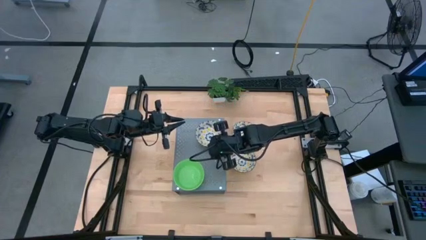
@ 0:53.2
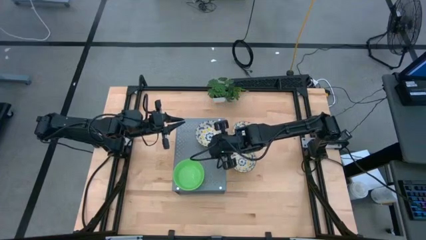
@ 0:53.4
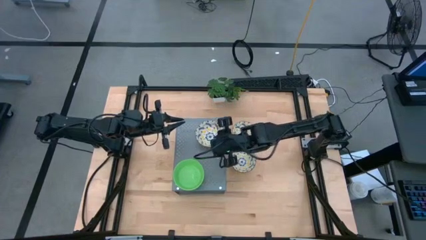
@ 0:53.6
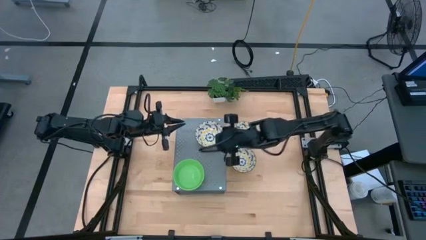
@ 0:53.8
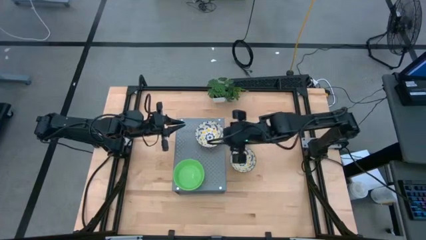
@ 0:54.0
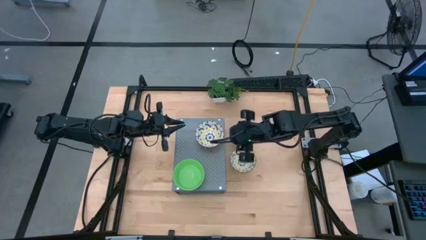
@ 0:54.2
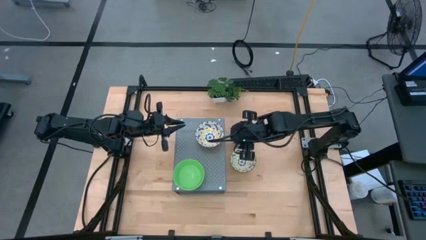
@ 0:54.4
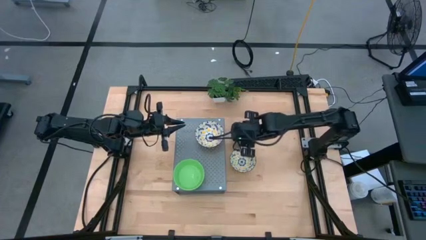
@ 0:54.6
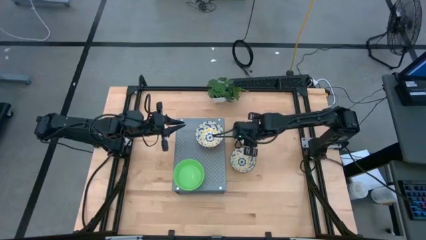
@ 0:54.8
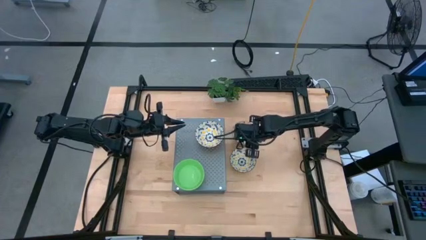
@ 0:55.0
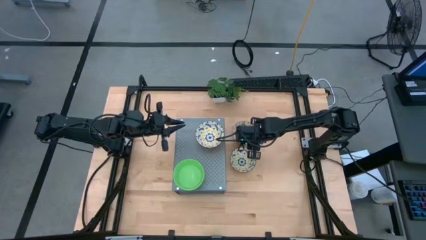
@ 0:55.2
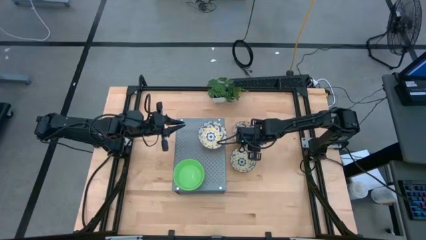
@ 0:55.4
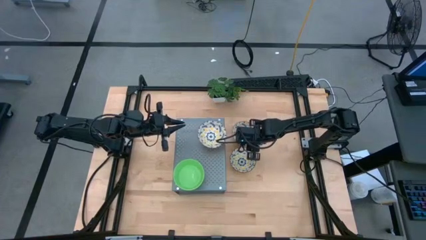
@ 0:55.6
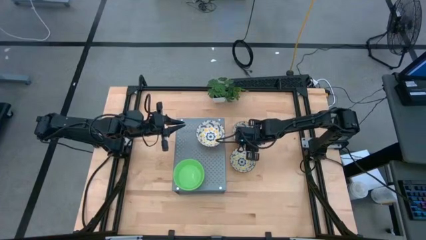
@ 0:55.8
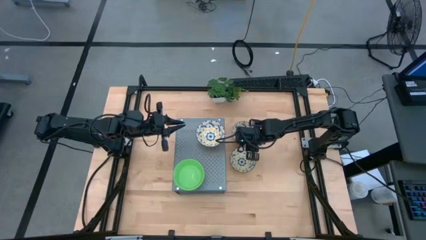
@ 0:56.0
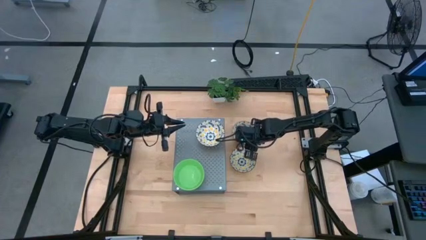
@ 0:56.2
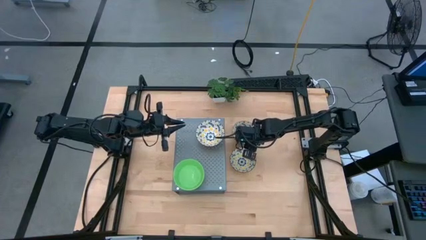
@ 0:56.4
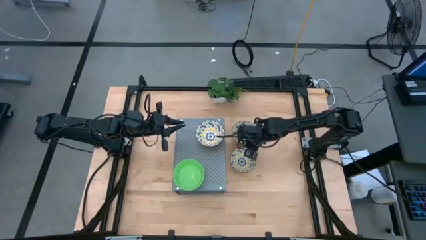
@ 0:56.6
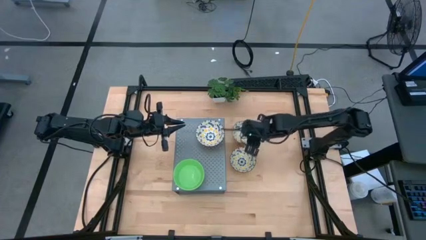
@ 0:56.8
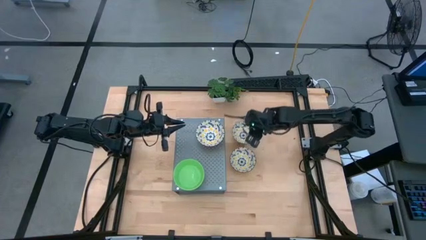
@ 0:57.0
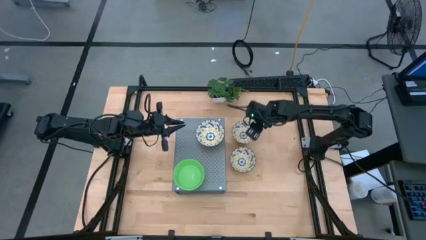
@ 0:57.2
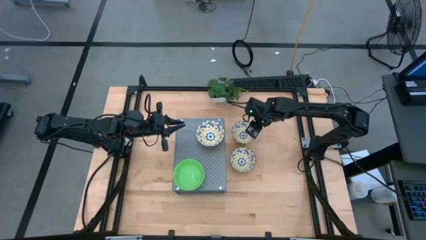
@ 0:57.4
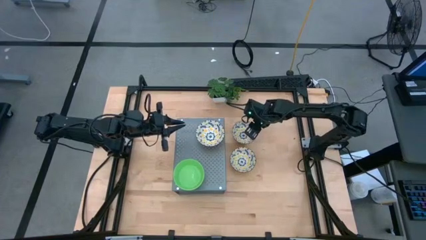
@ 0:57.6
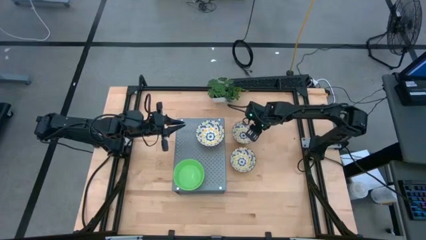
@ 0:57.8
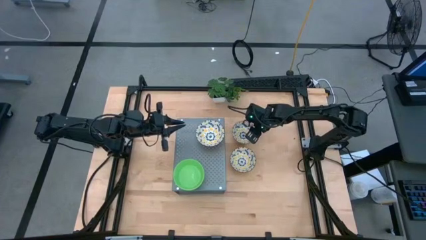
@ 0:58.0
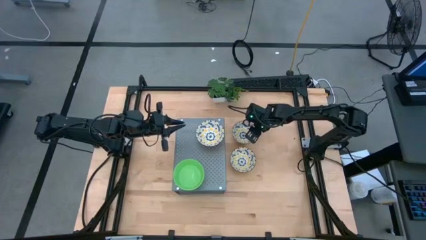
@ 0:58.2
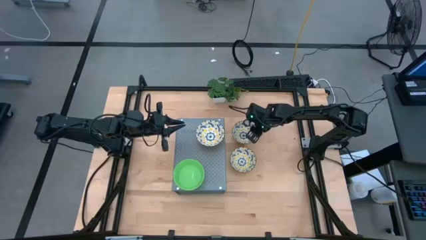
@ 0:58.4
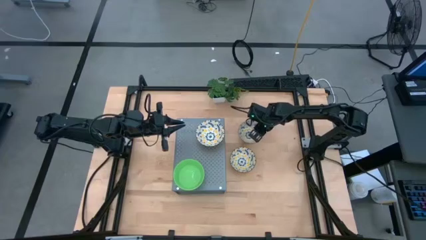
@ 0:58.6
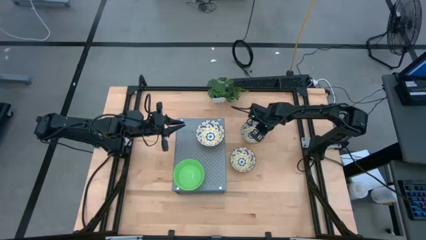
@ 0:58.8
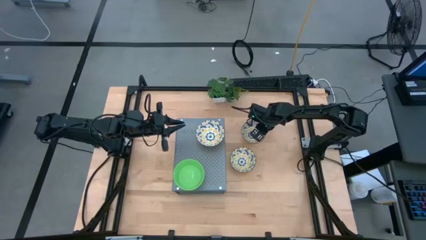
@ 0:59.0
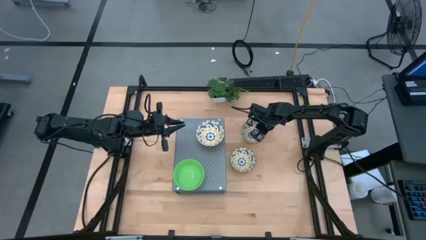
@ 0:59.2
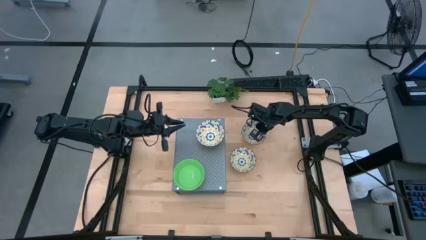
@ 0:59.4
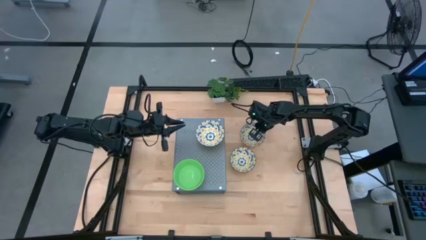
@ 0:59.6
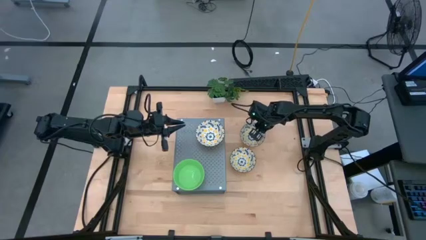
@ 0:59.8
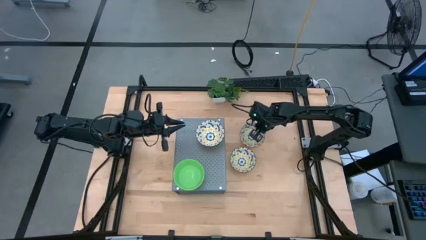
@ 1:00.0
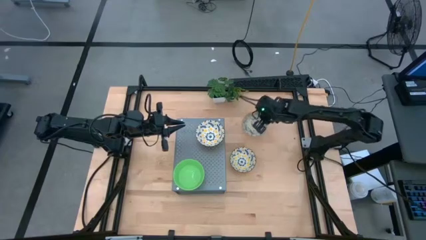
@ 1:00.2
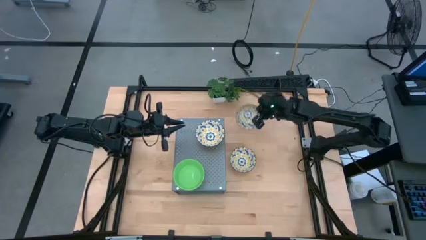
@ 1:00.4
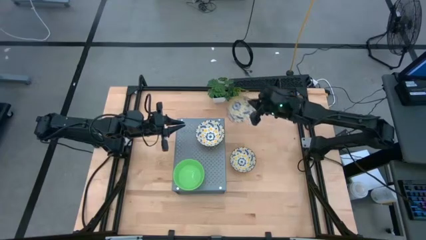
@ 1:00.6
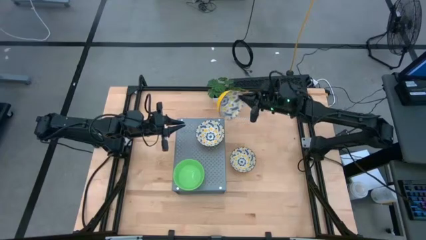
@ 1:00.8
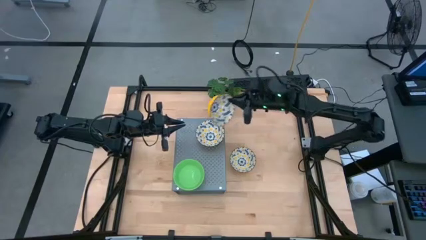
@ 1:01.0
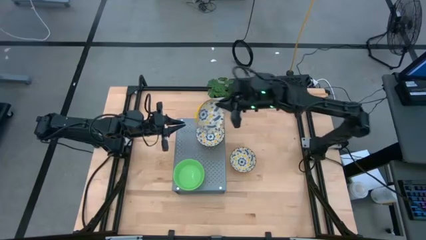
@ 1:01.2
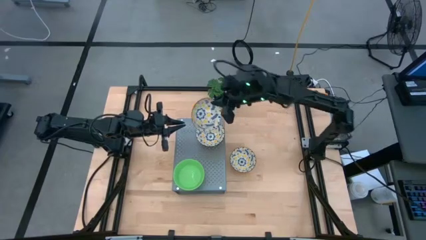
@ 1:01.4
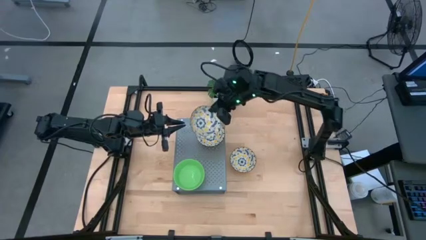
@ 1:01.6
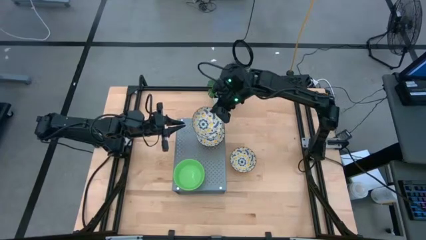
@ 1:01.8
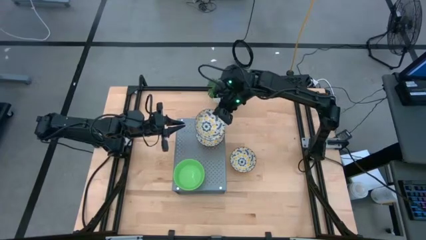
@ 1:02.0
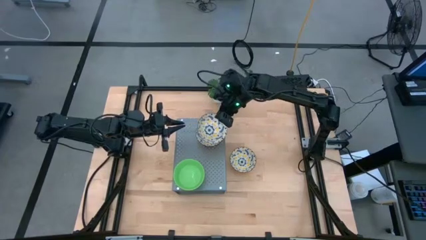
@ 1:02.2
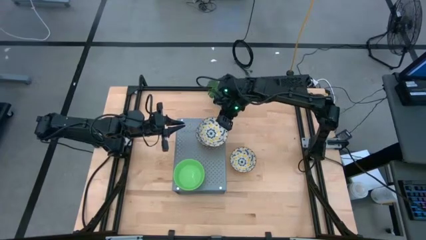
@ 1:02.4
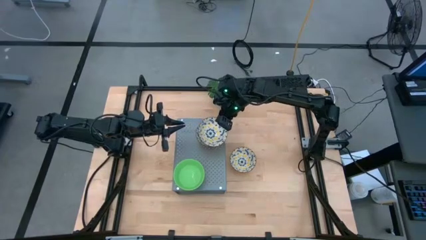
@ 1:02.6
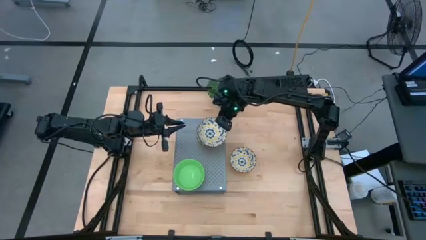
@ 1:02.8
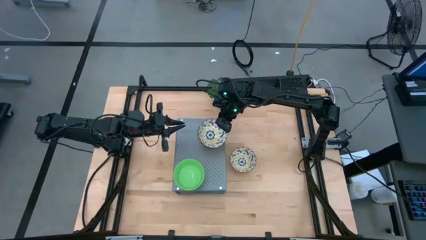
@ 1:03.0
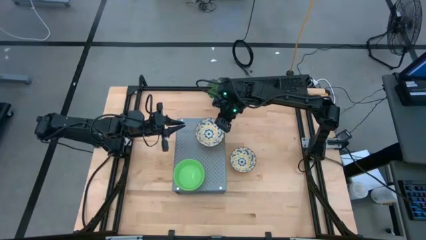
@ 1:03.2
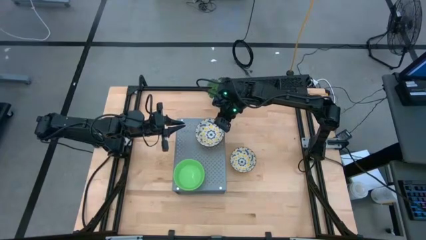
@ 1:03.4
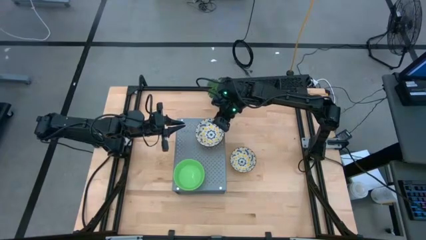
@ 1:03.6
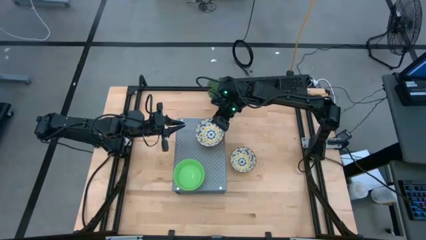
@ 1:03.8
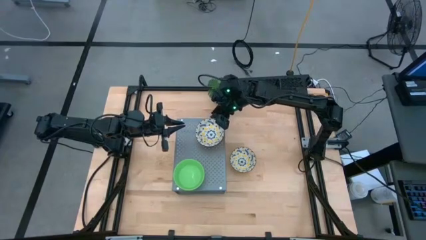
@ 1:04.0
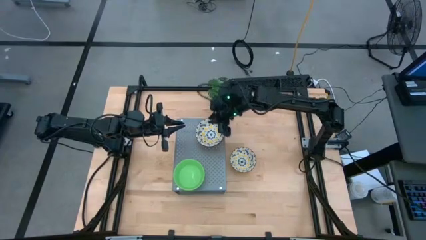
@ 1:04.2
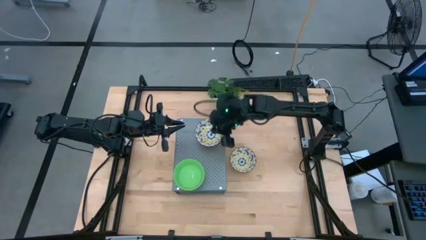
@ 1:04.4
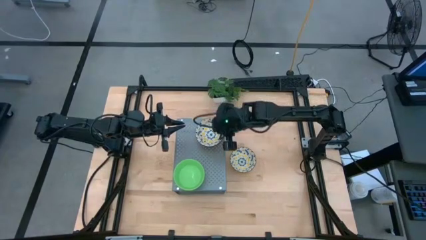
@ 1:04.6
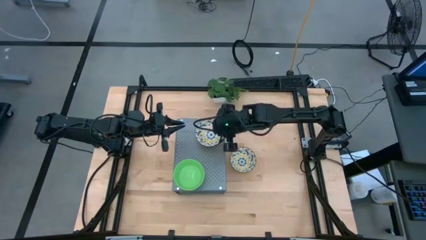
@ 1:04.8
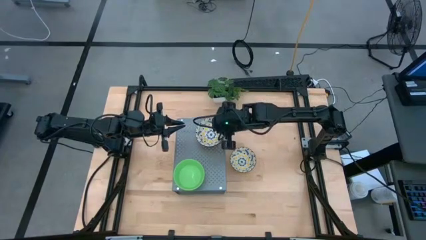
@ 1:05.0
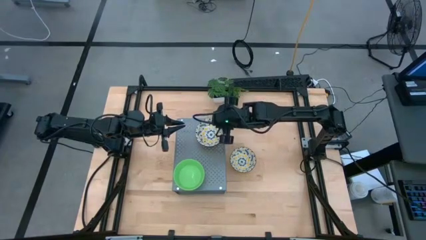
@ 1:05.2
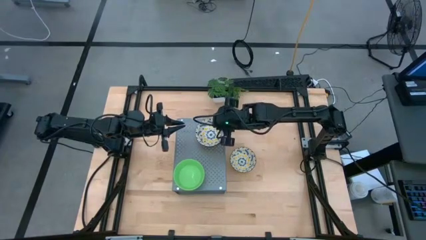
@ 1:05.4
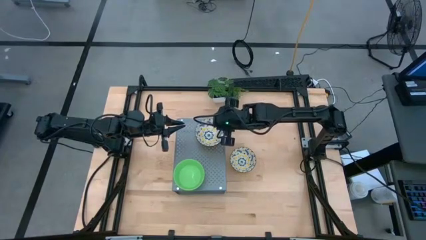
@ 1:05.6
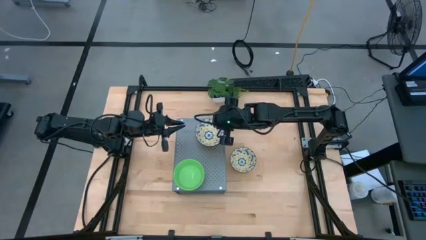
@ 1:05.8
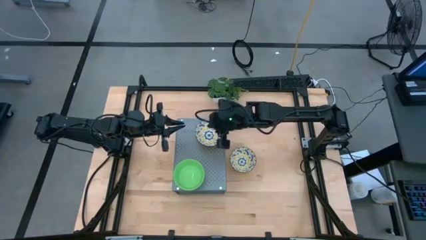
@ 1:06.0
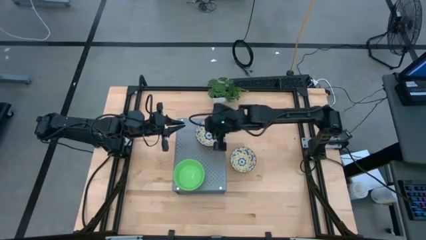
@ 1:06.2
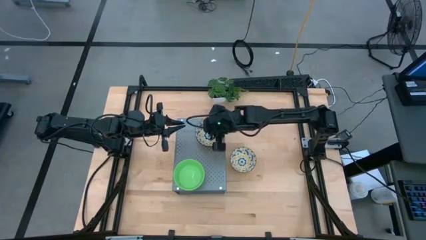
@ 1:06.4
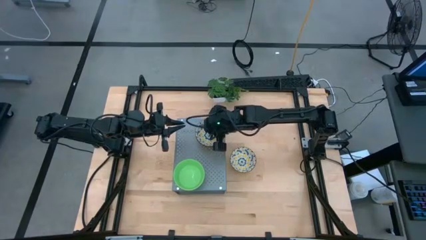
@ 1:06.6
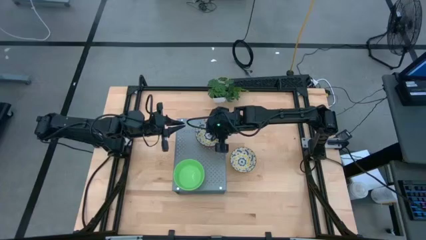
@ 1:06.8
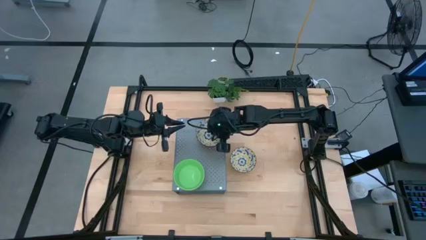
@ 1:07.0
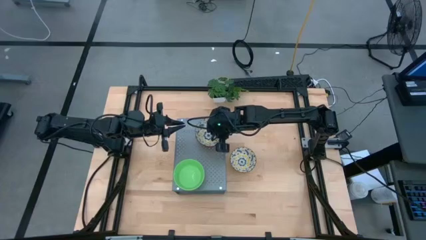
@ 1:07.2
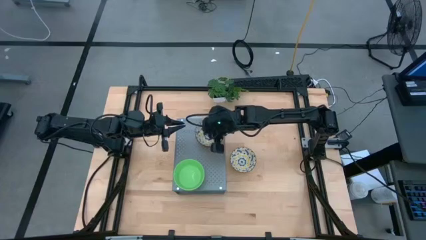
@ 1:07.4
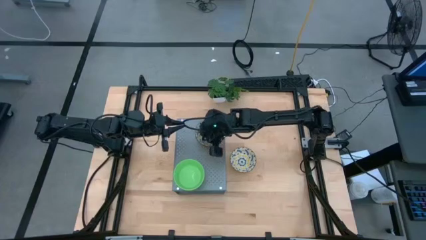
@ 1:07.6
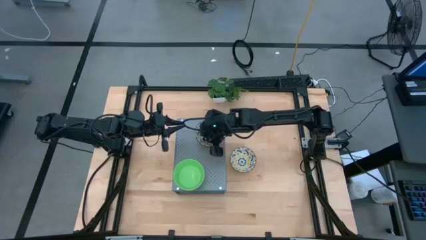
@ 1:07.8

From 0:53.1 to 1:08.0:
Task: Pick & Place Mini bowls
Stack the top white patterned bowl on the white patterned bowl on the shelf

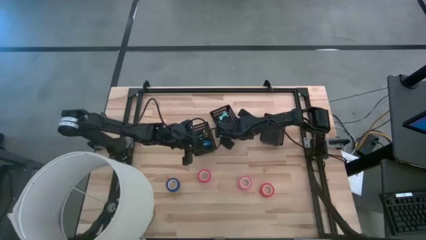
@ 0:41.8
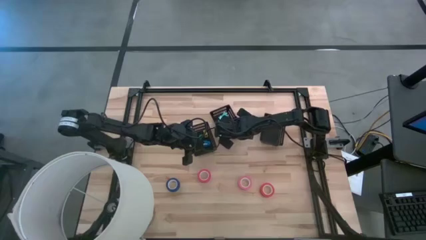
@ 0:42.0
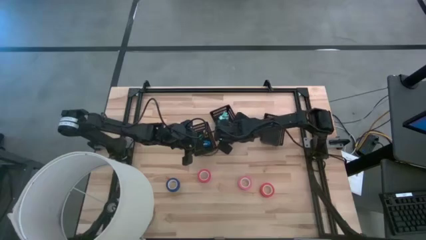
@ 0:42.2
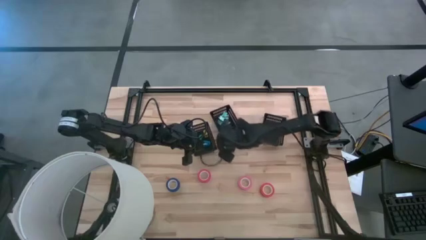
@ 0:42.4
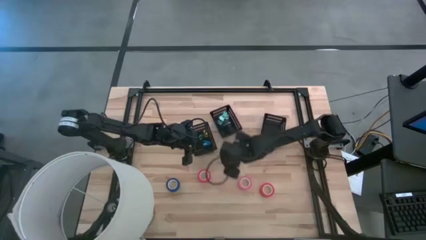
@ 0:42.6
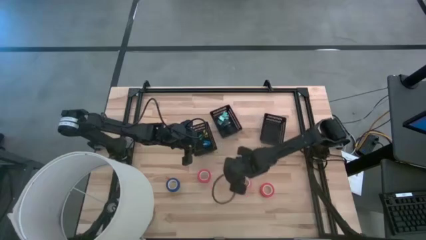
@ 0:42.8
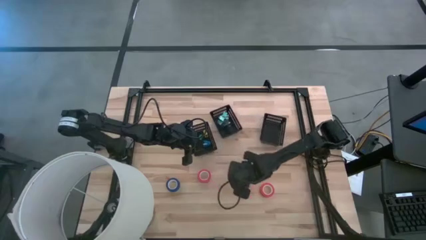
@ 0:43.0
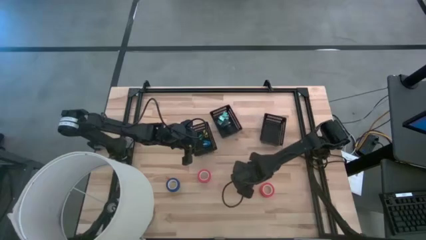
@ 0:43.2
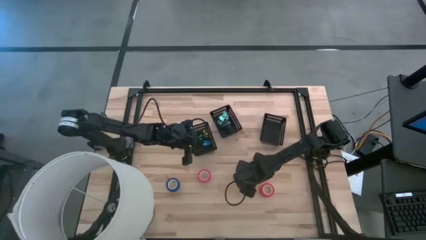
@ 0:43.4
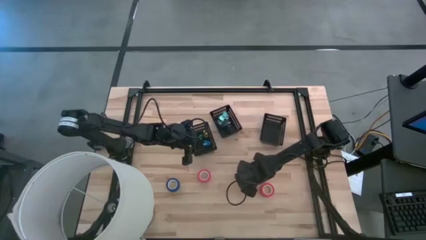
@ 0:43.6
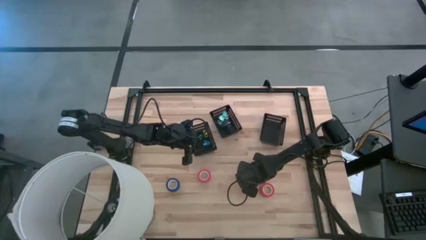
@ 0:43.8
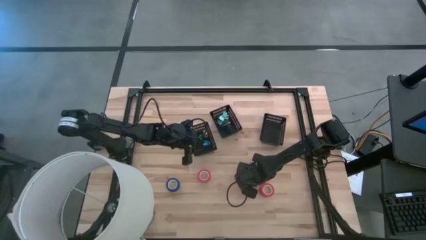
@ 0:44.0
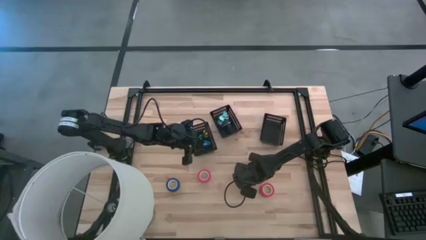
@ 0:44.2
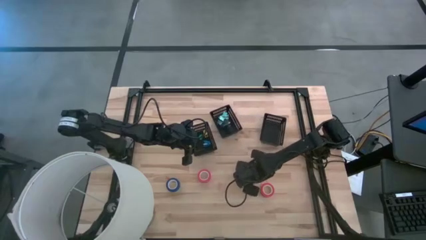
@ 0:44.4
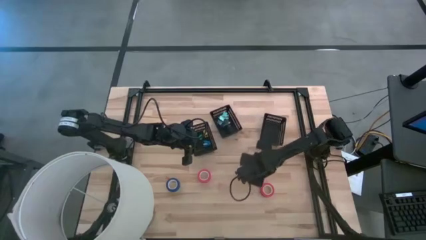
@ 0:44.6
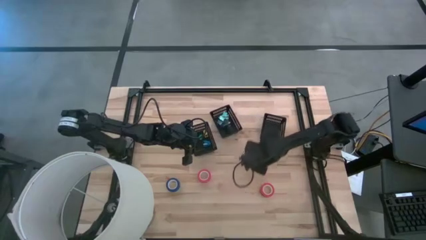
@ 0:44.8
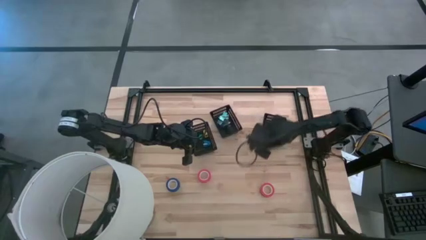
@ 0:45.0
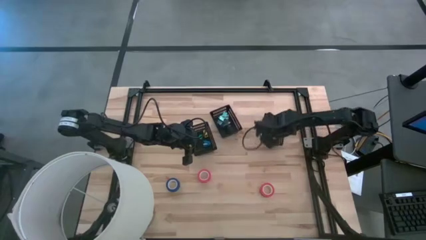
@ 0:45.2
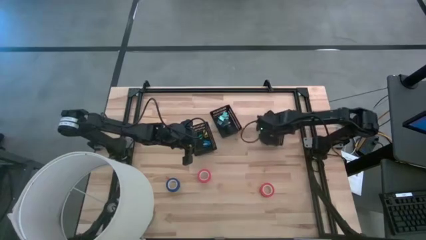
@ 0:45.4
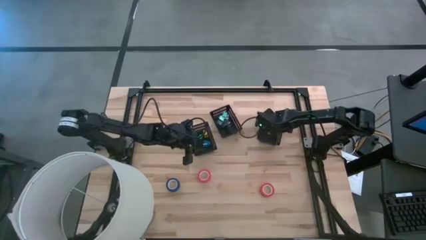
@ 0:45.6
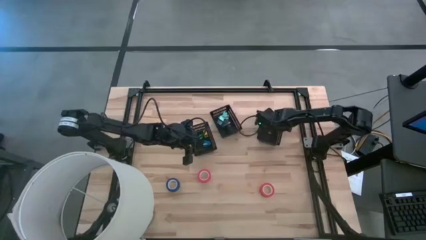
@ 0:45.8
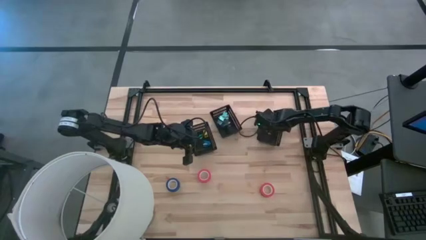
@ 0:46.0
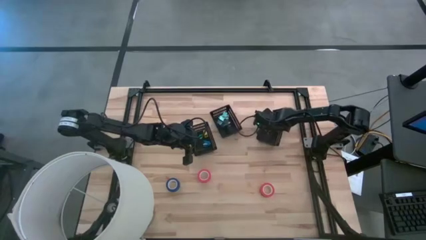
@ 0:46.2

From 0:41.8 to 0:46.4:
Task: Pick and place Stapler, Stapler remover, tape
Put the pink tape into the right black basket
